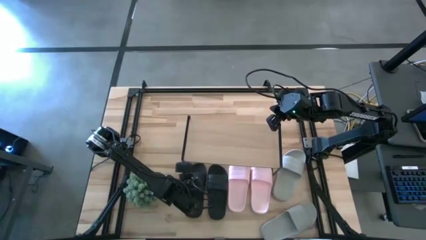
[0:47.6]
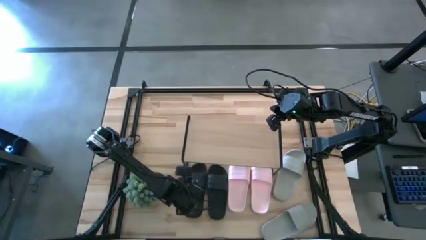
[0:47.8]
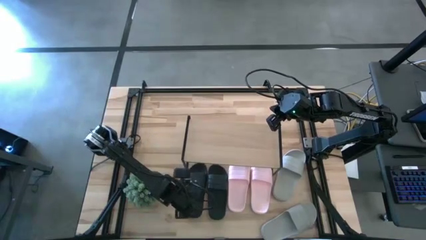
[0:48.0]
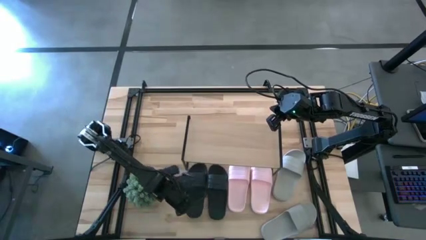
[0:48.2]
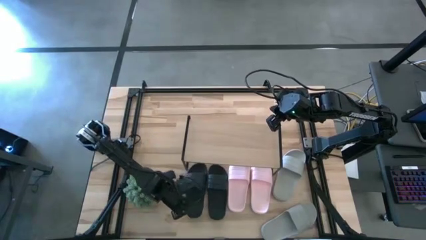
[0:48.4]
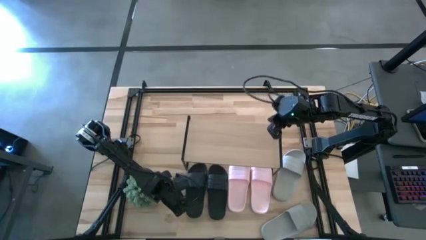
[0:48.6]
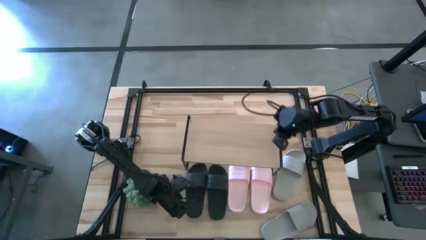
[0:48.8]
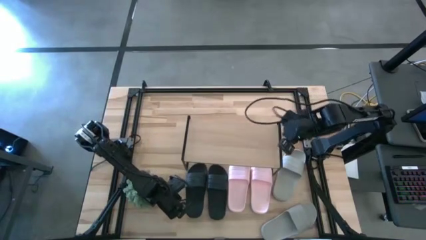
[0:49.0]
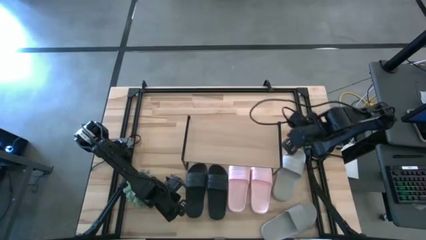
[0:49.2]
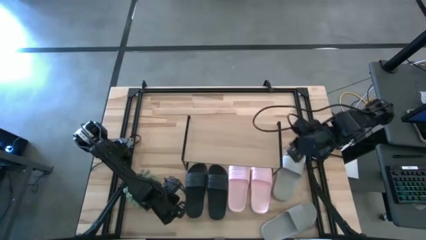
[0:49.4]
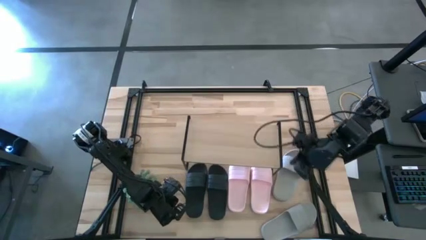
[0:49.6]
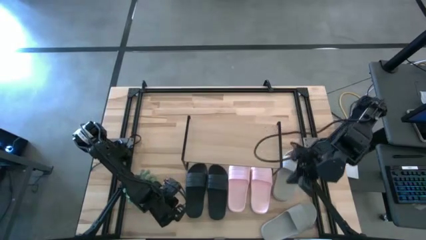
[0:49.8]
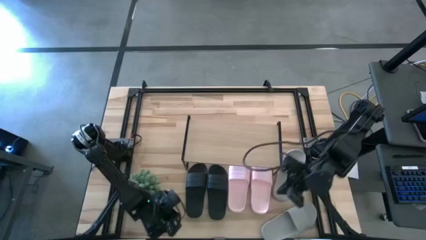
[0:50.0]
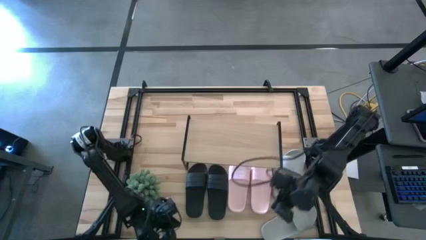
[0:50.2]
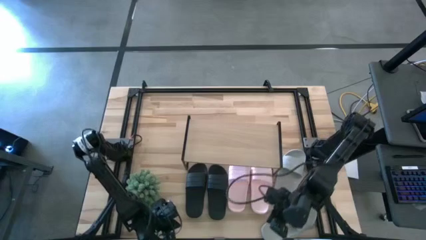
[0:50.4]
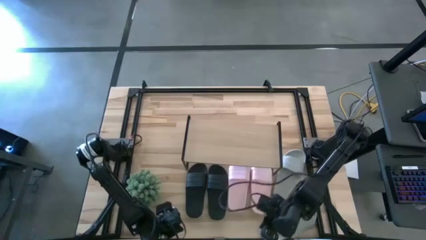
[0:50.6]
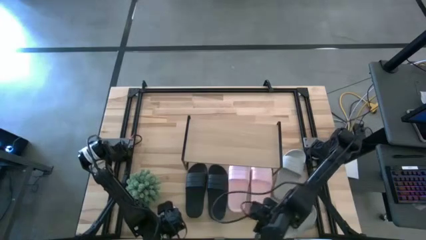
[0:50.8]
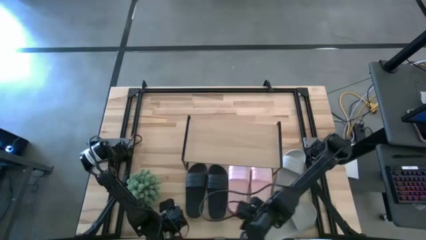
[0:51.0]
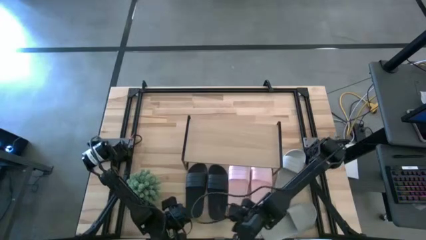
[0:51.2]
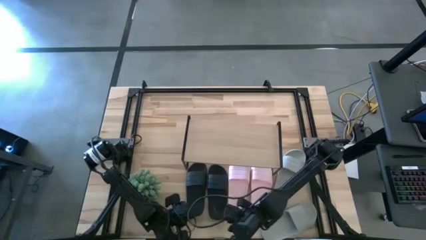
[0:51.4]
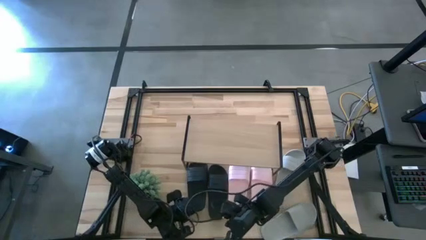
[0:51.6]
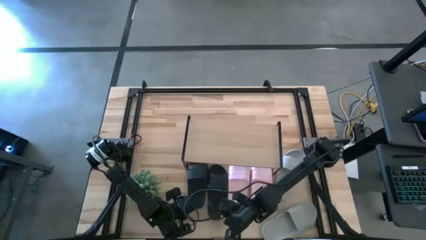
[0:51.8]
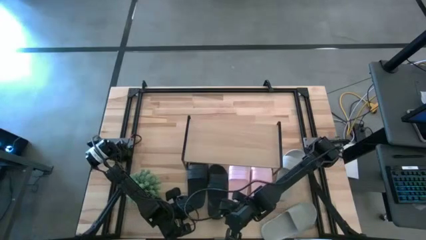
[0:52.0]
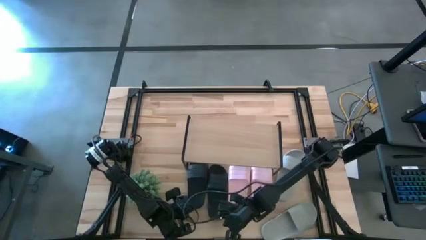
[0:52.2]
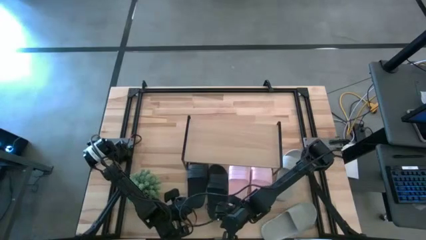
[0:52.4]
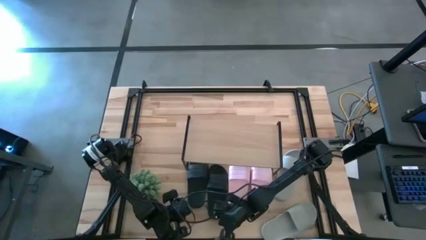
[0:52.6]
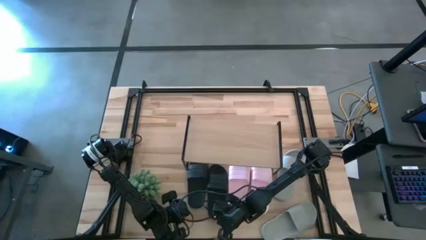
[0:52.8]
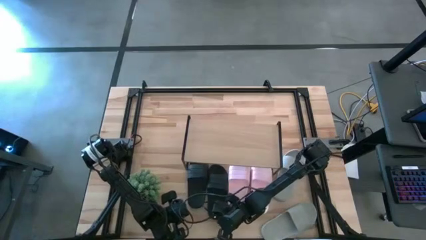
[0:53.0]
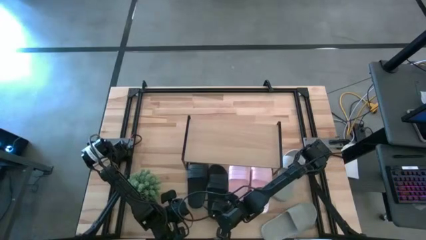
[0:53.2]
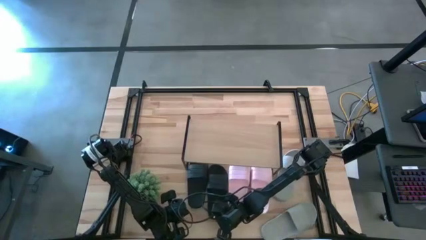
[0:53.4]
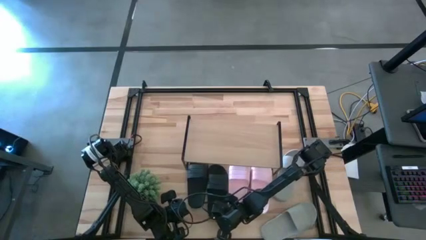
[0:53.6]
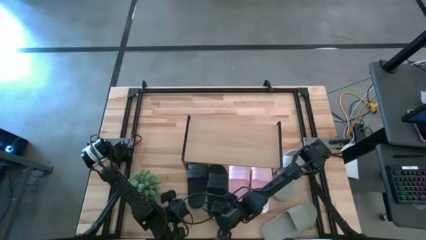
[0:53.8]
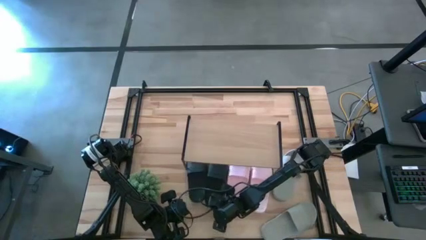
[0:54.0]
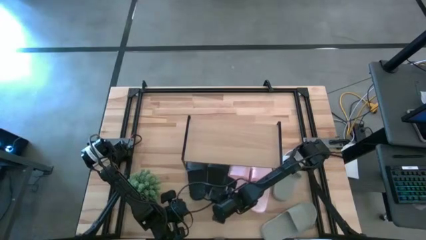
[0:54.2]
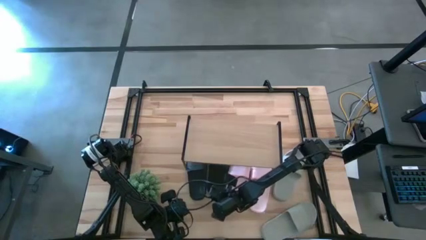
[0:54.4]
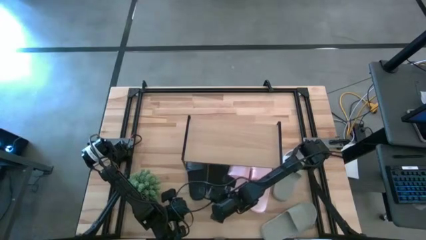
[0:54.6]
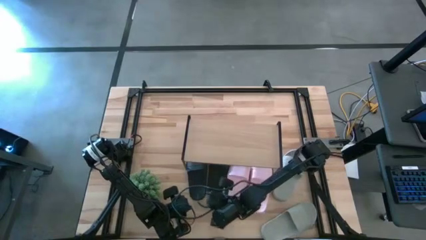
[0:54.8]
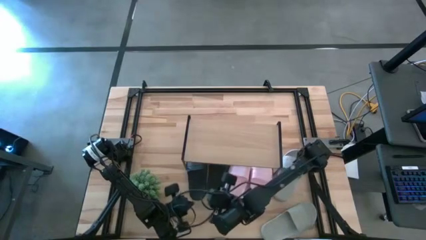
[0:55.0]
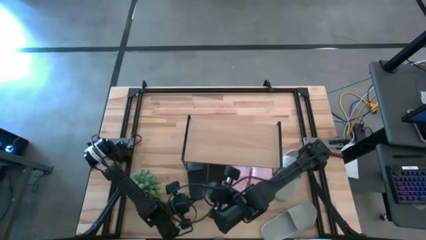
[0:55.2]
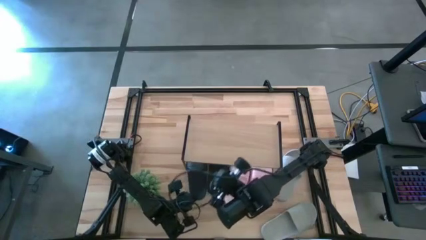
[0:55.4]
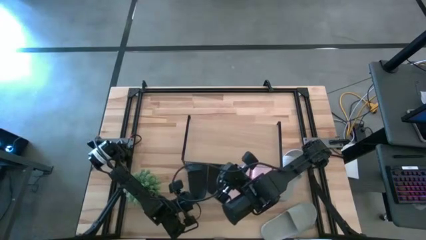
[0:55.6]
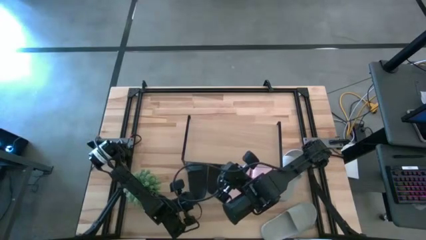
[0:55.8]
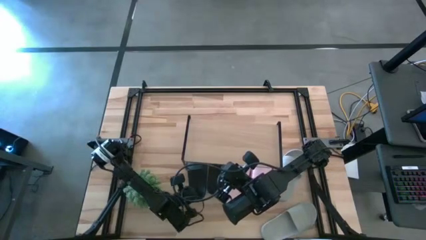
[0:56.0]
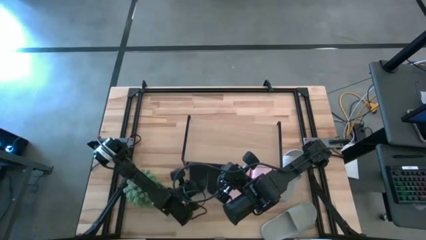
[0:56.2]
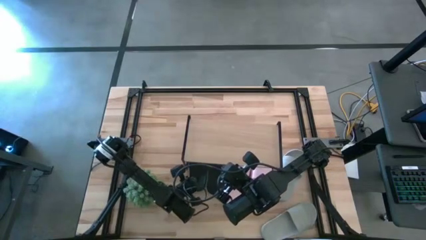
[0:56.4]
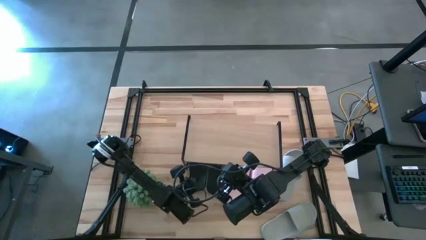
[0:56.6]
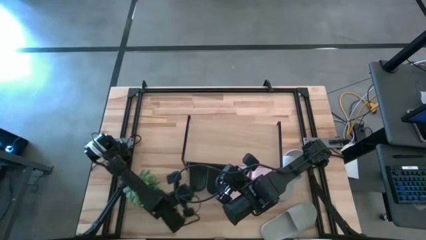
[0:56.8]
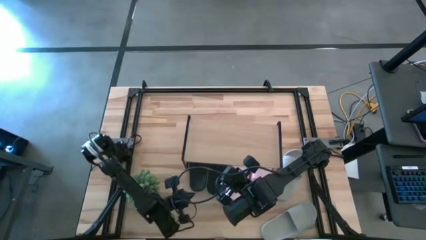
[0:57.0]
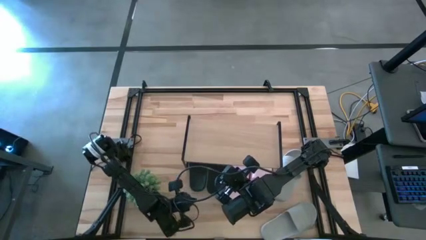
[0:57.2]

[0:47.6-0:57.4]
Task: Pick and place slides into the shelf
Adjust the pink and black slides under the shelf

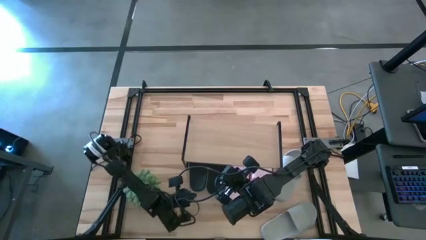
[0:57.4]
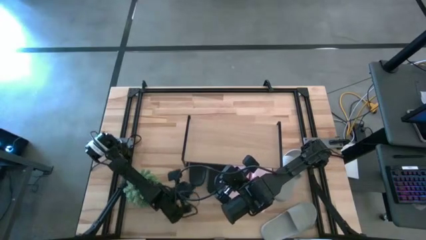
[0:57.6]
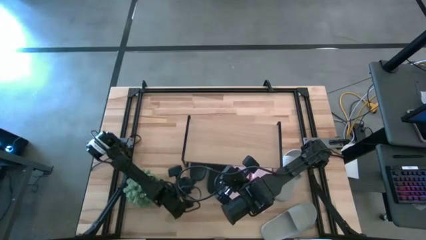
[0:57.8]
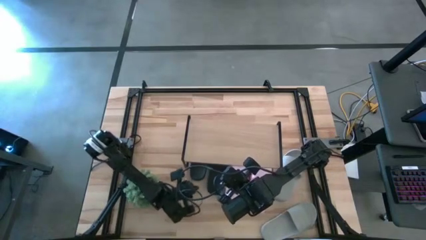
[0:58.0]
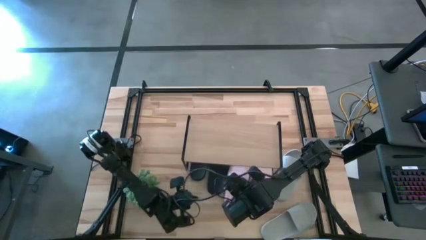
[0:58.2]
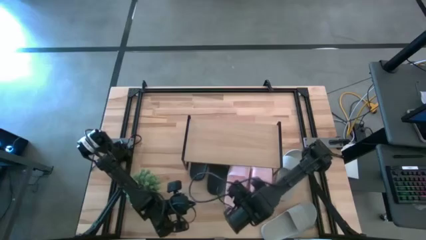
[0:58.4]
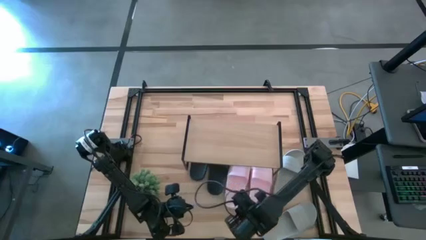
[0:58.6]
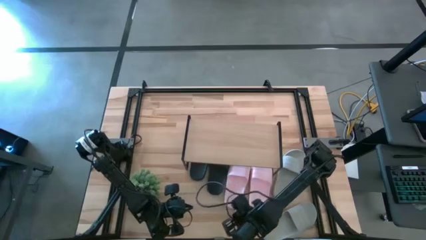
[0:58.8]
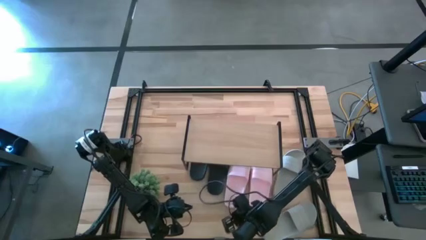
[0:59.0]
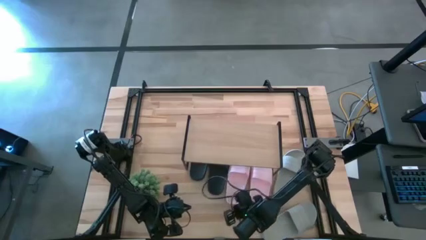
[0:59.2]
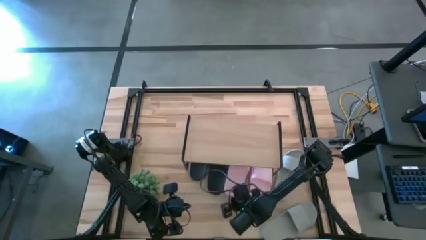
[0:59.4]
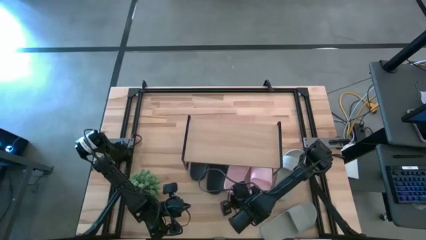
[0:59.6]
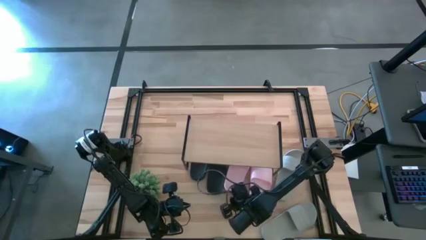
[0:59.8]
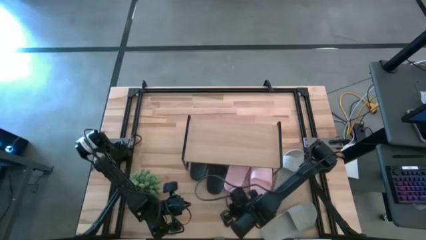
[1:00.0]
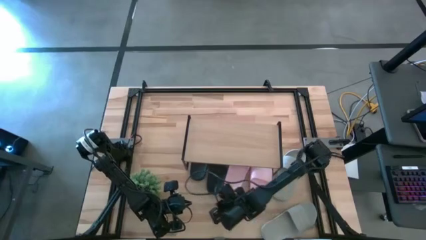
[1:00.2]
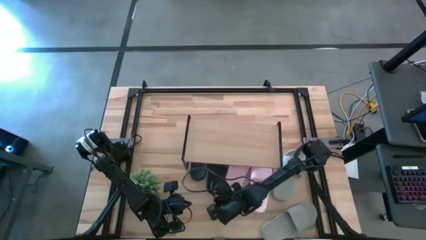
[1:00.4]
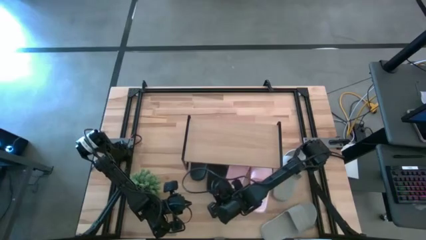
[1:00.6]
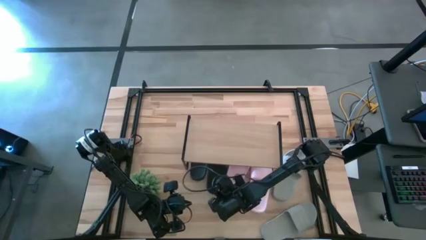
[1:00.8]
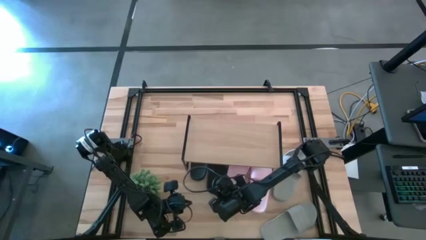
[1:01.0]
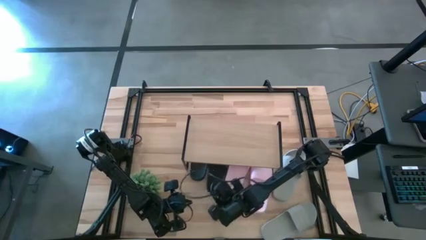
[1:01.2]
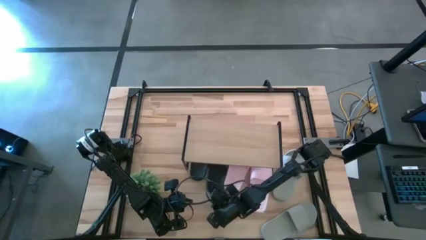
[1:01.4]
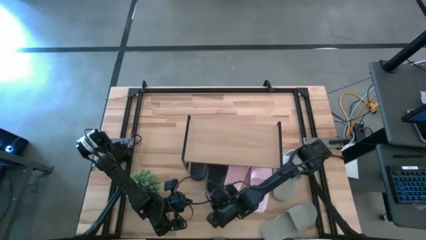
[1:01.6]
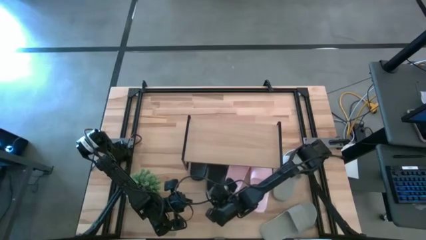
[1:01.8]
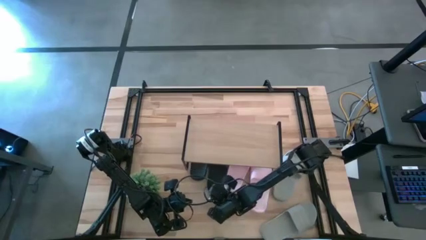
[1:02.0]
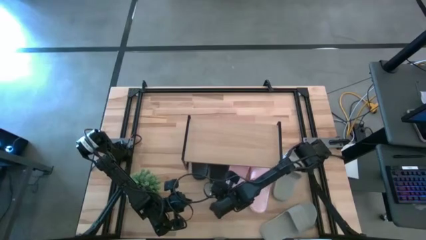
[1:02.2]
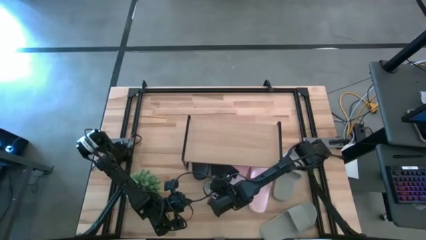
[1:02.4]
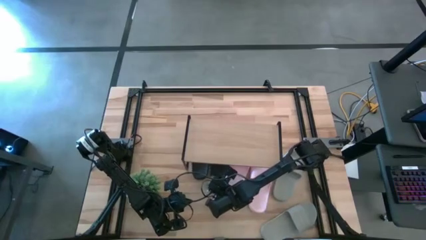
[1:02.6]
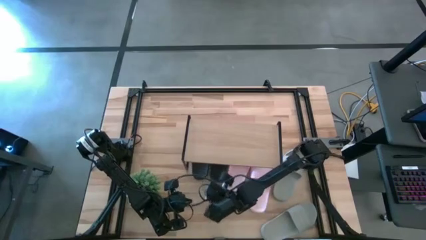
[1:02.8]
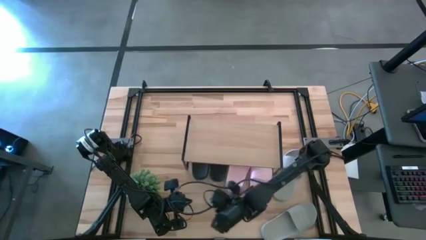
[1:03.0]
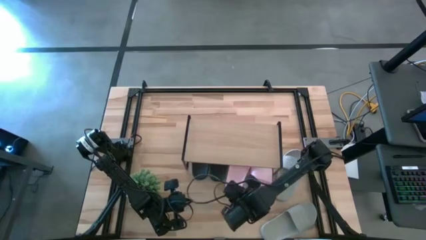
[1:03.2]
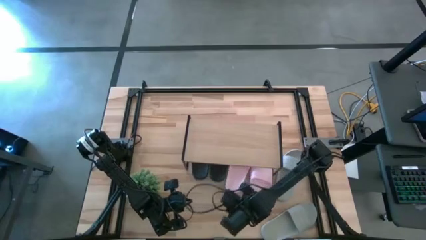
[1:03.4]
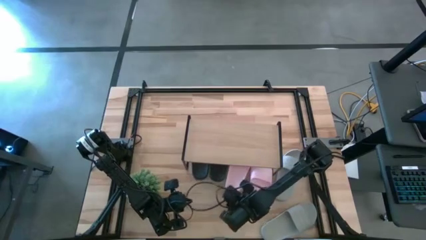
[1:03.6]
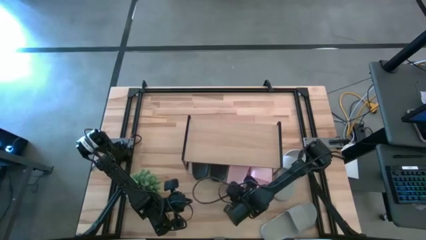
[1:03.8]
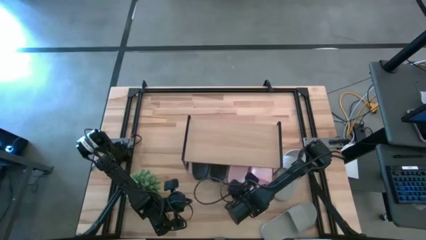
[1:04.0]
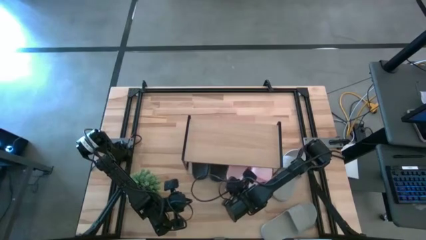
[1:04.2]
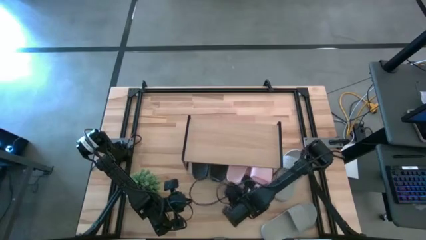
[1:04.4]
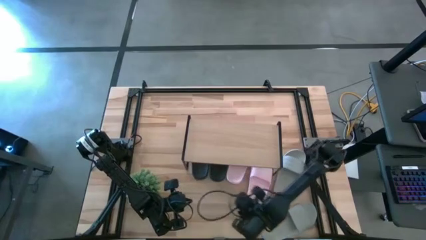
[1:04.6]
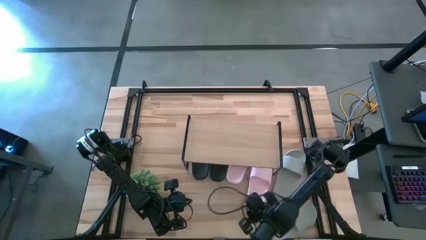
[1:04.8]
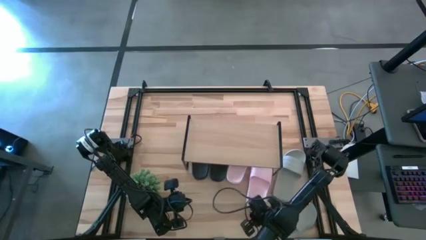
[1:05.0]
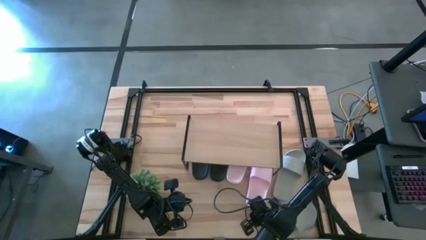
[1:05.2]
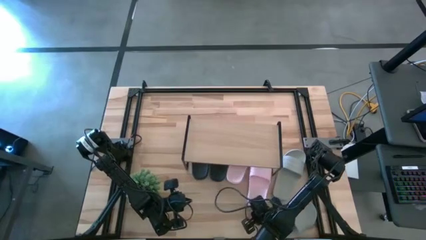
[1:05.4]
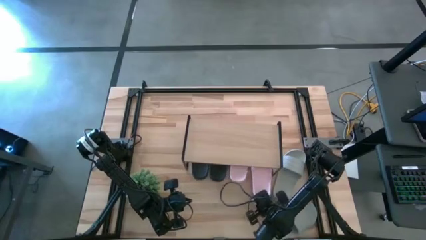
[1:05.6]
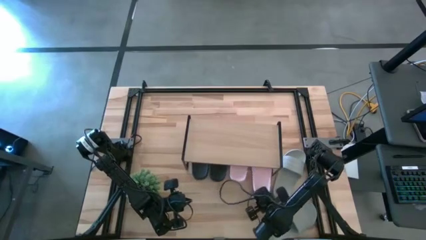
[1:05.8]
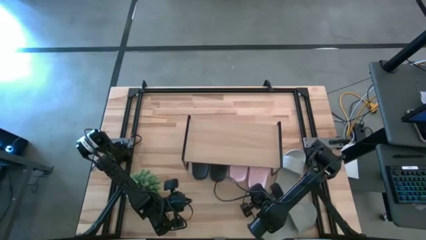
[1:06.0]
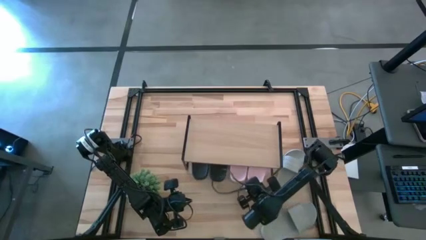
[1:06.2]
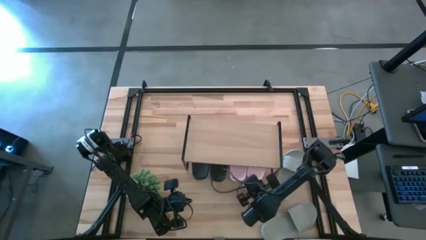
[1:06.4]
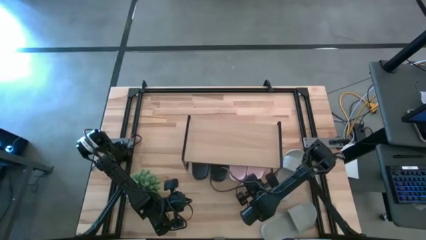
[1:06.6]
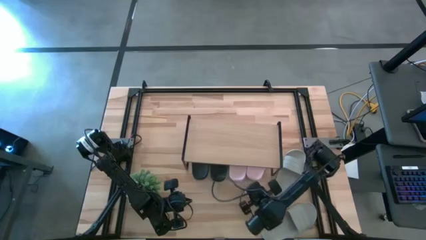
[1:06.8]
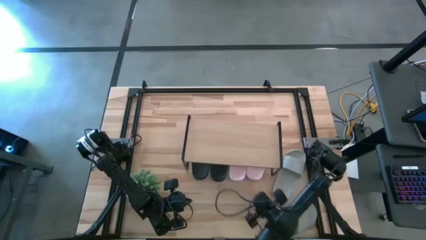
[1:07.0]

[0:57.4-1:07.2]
Adjust the pink and black slides under the shelf
